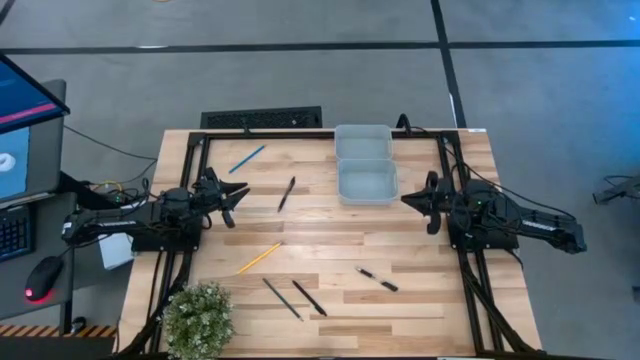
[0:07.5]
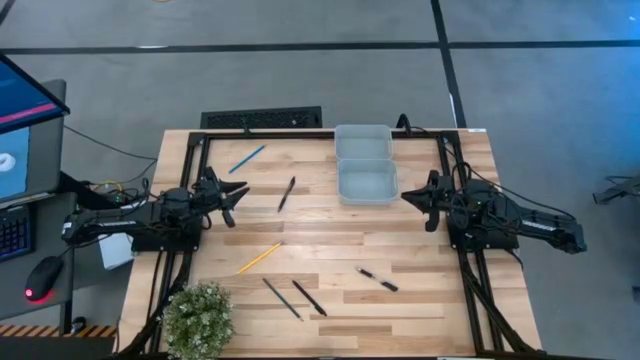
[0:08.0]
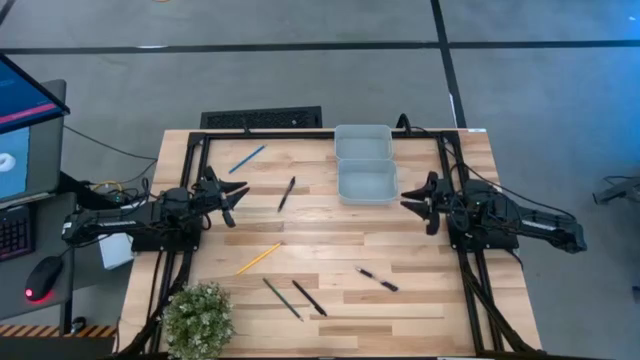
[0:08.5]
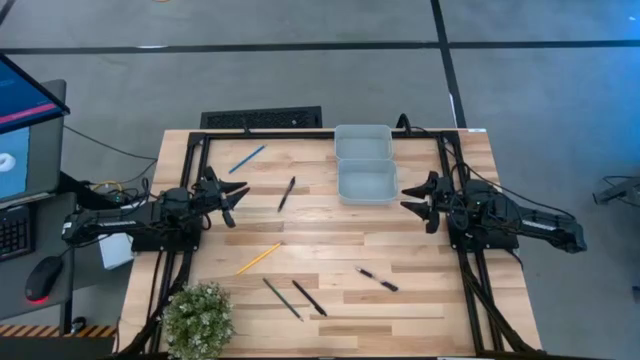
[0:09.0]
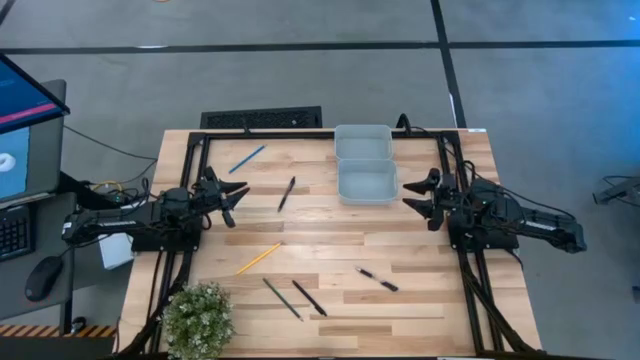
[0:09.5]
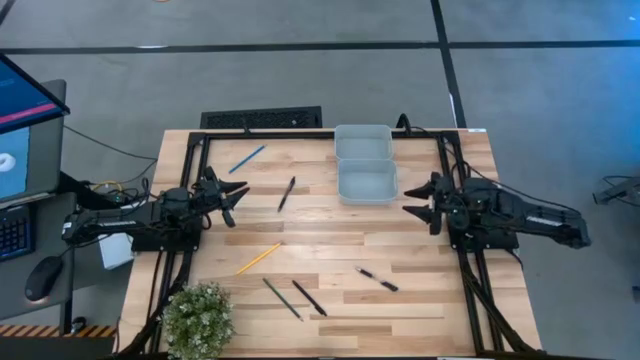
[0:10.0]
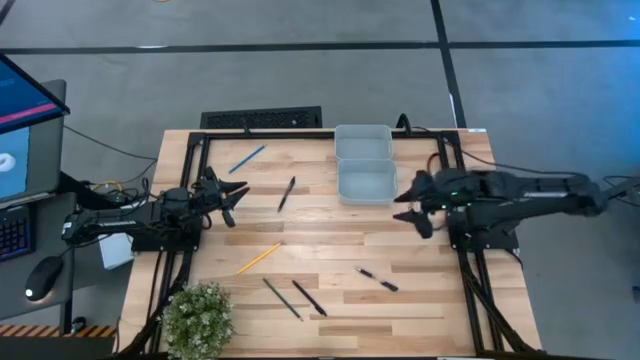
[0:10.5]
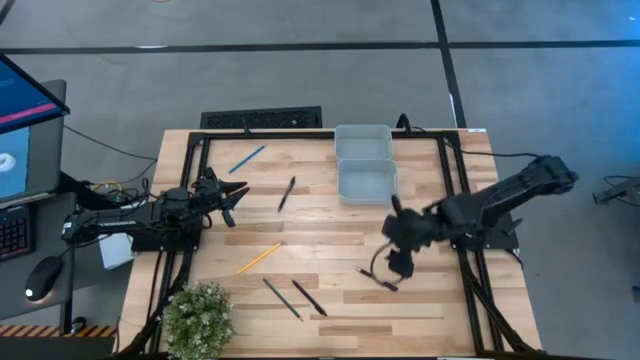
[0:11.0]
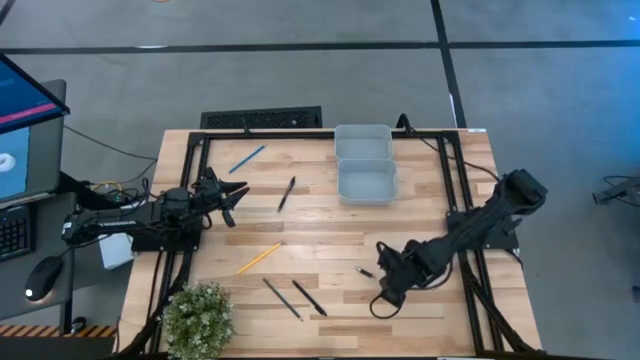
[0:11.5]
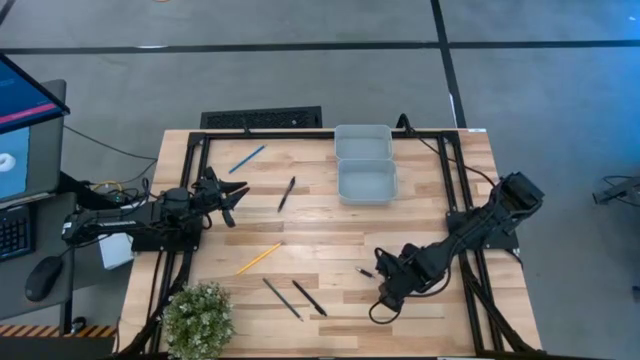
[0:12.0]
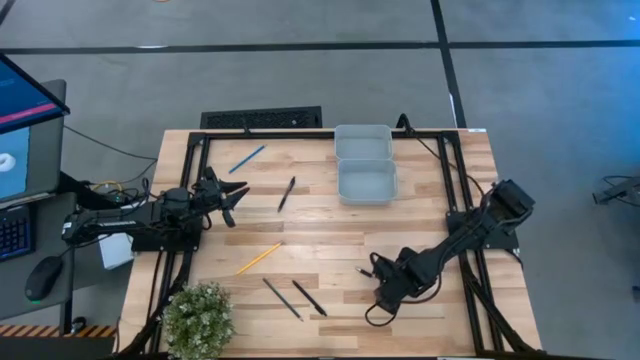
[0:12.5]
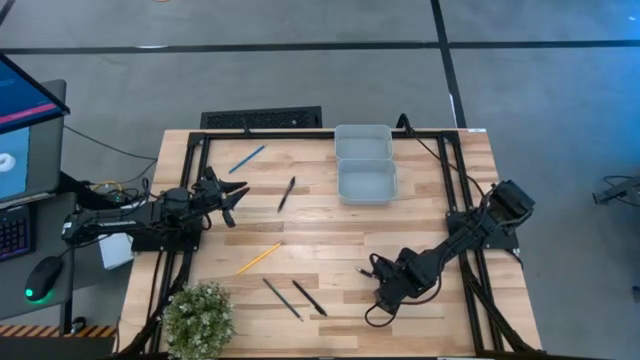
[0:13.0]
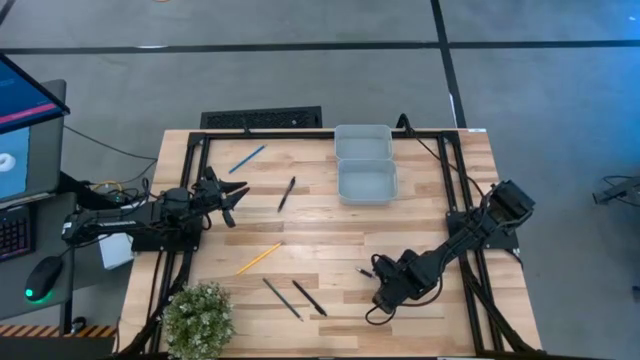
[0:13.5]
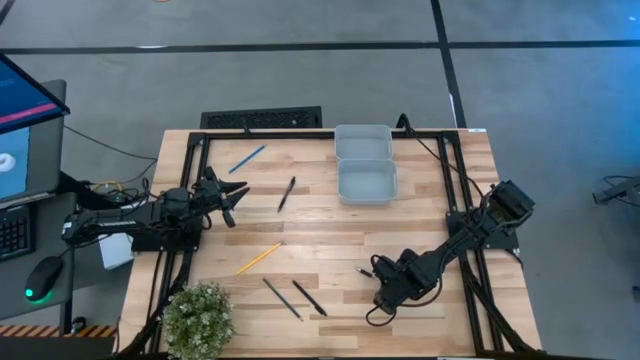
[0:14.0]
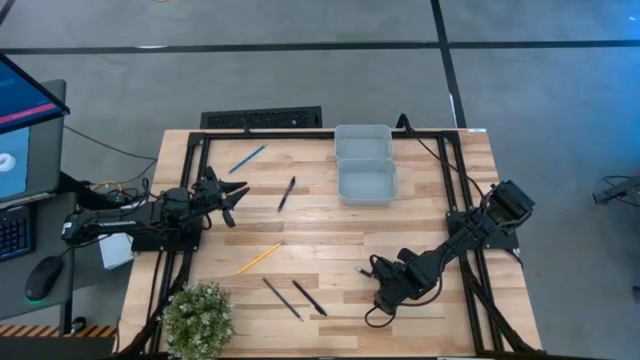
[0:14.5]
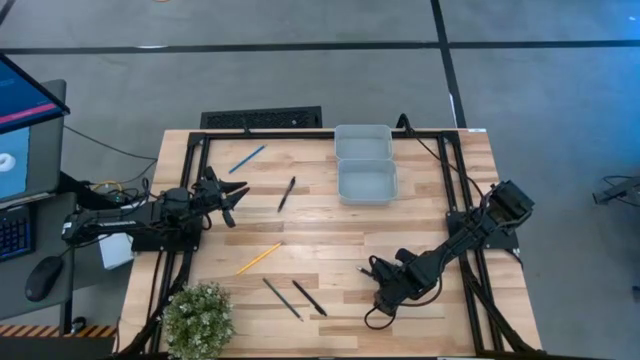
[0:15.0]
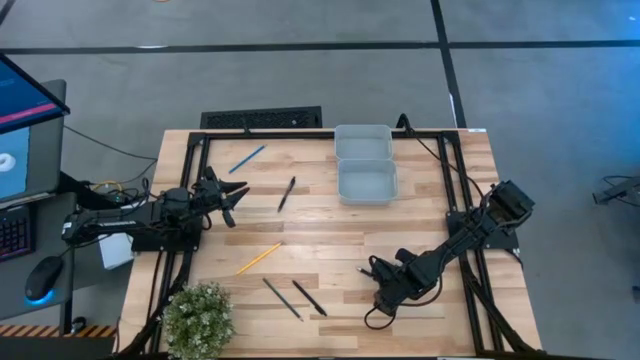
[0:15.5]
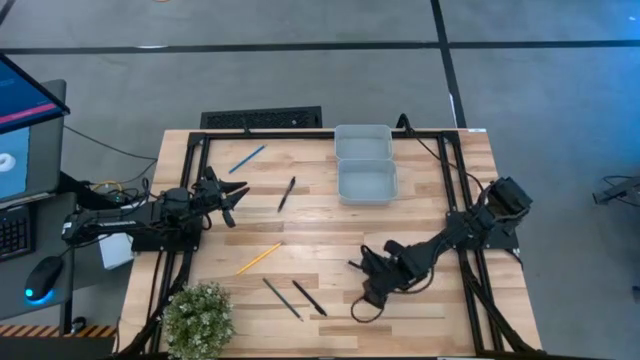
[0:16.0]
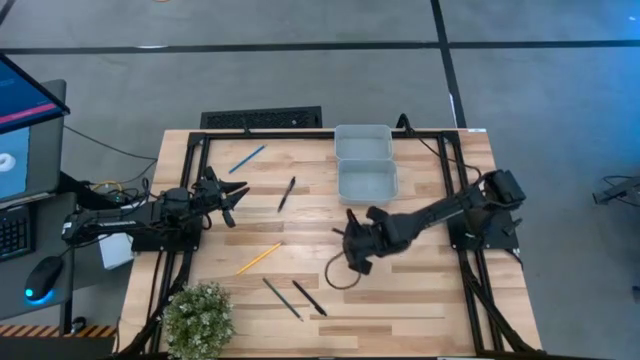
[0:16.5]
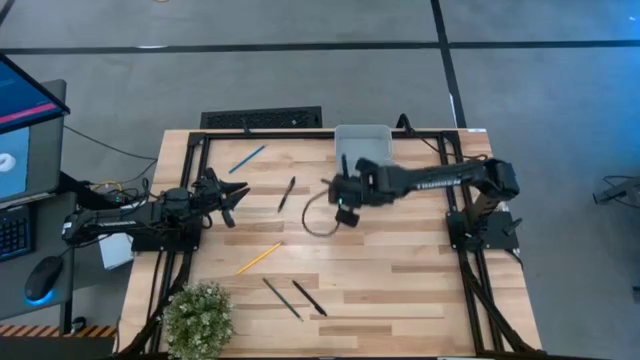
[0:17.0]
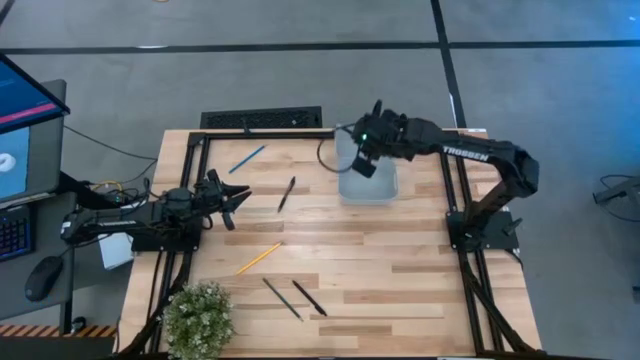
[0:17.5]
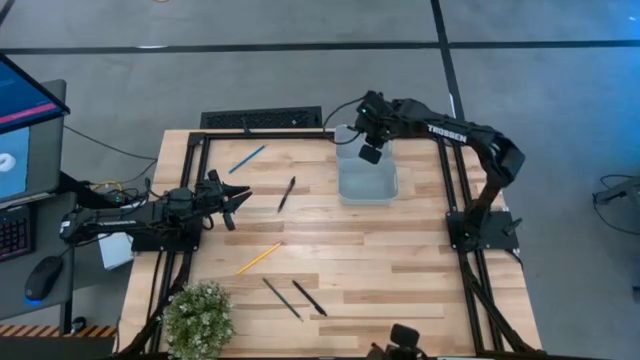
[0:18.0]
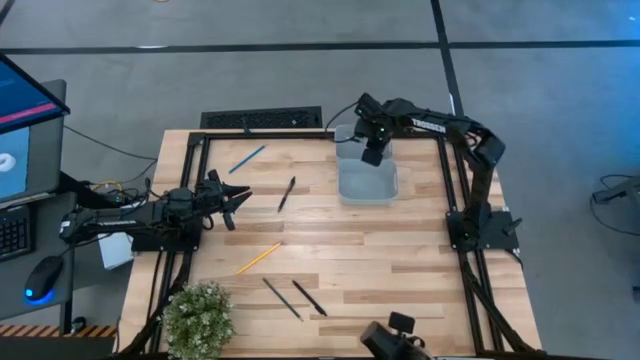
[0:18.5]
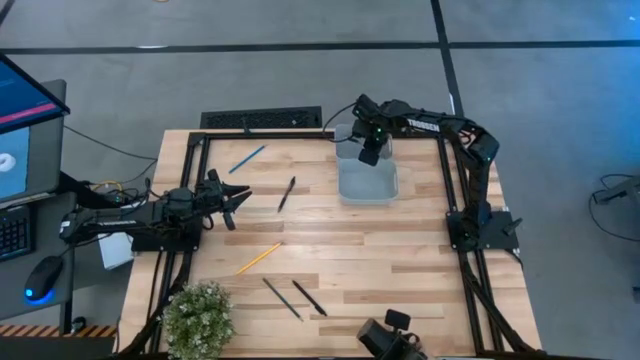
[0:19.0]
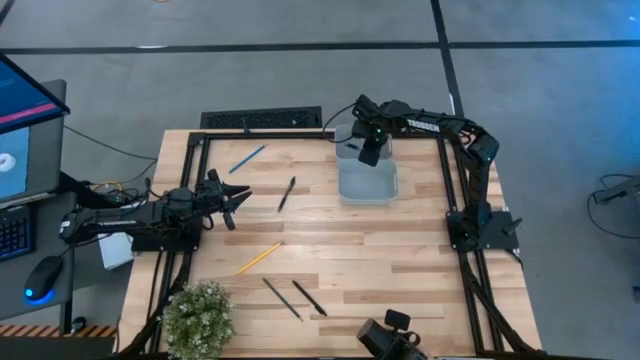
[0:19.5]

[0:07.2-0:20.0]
Task: Sort pens & pencils
Put the bottom right black pen into the top bin

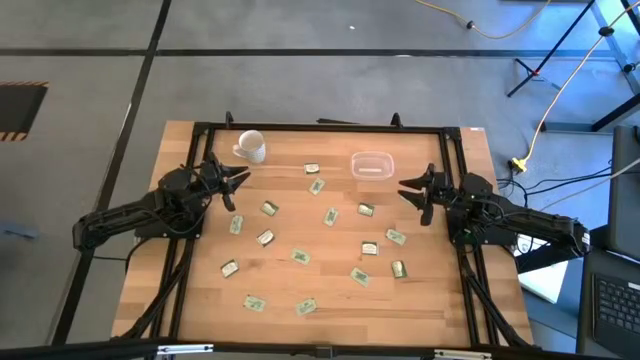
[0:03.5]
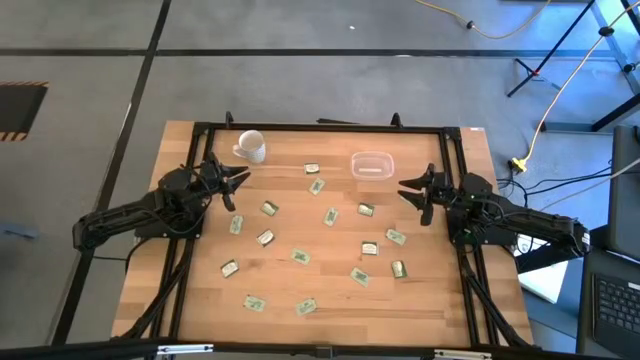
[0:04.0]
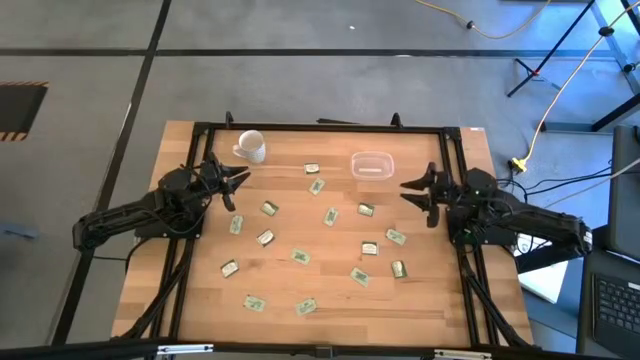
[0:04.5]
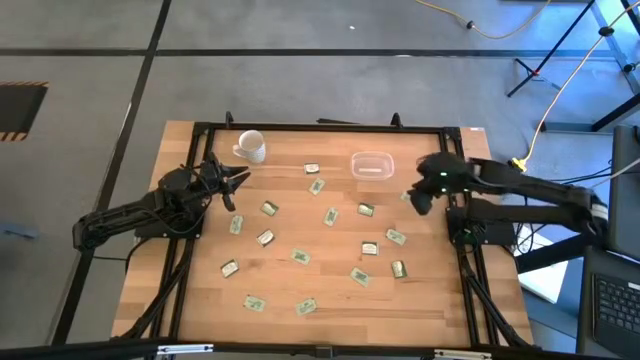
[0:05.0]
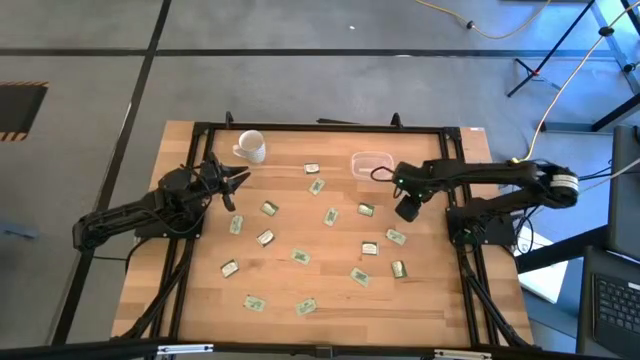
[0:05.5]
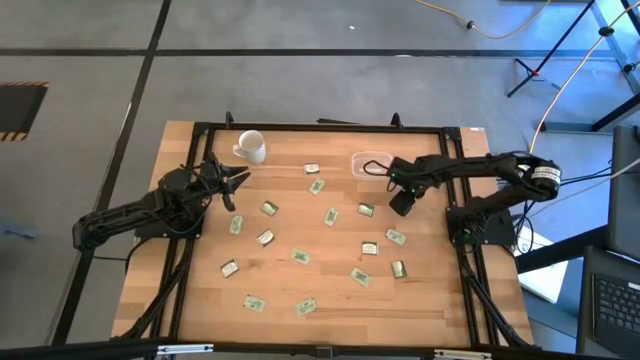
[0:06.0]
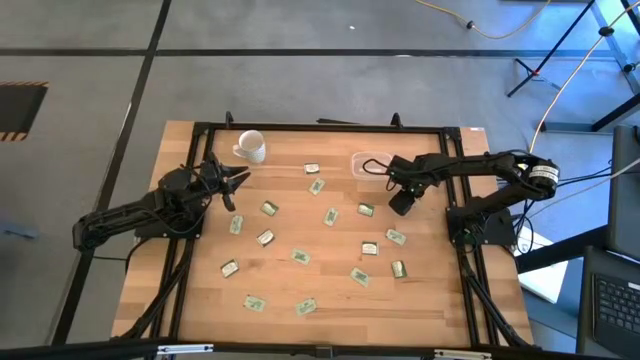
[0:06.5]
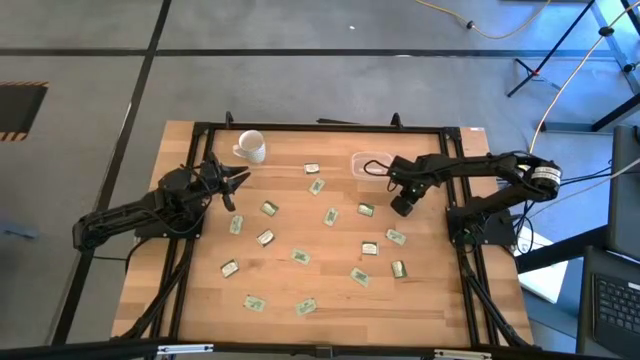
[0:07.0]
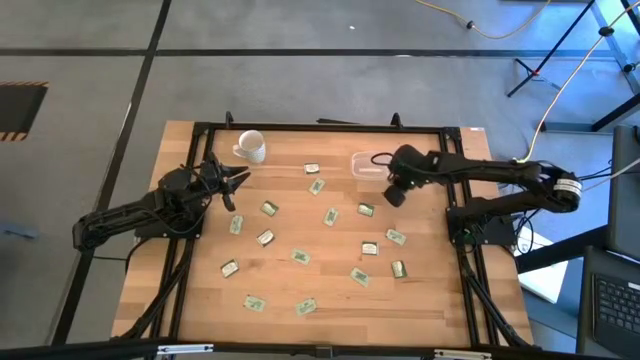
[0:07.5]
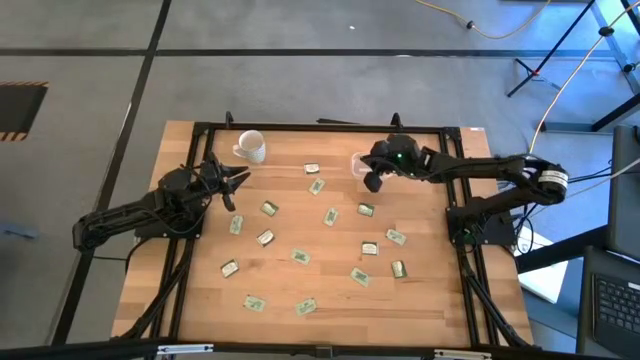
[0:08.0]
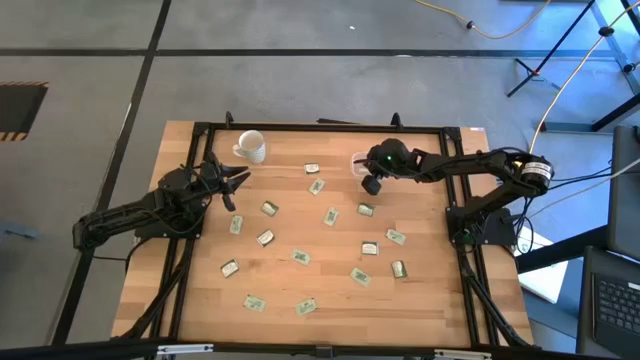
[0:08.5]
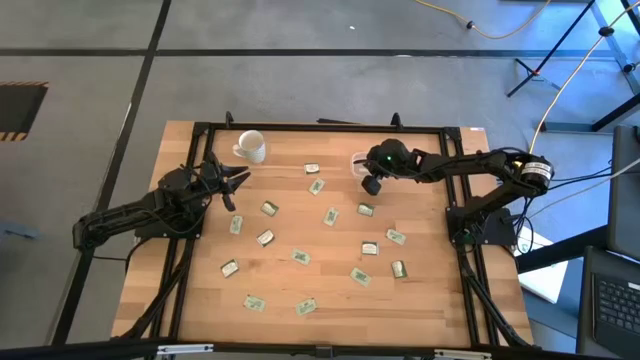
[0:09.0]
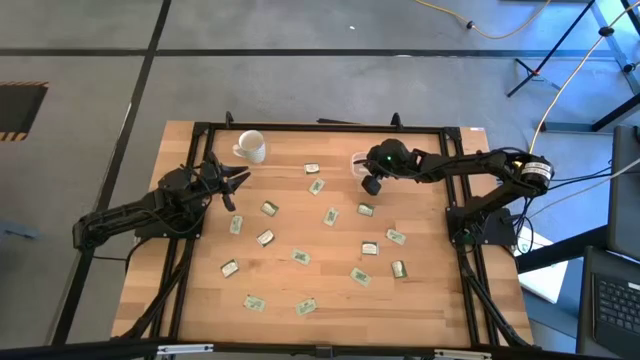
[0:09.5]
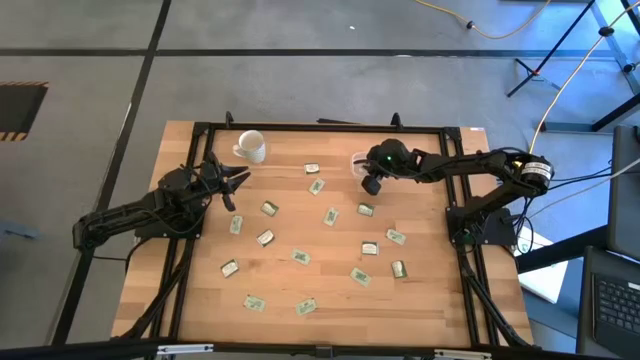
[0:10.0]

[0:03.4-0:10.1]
Task: Pick and place items into bin
Put the stevia packet into the transparent bin

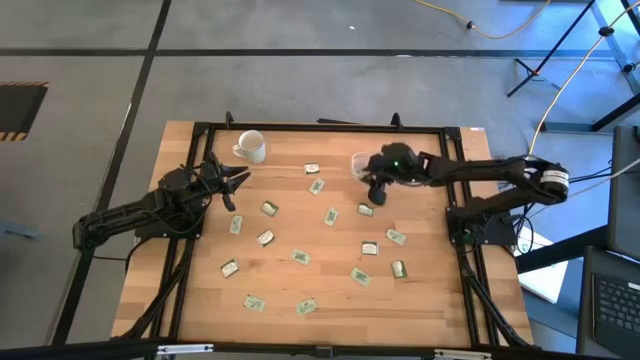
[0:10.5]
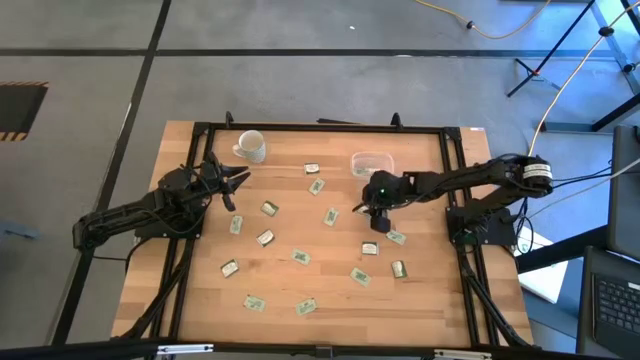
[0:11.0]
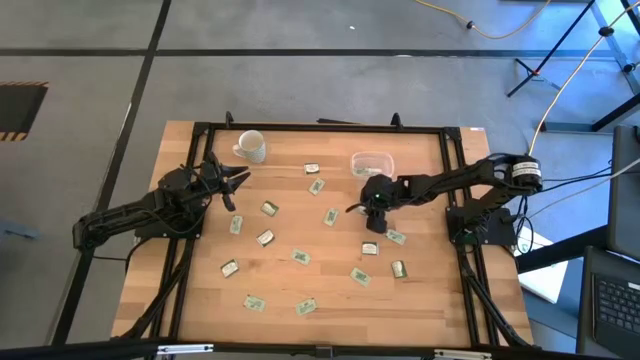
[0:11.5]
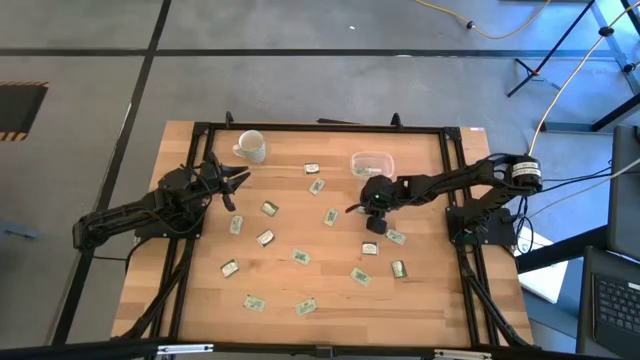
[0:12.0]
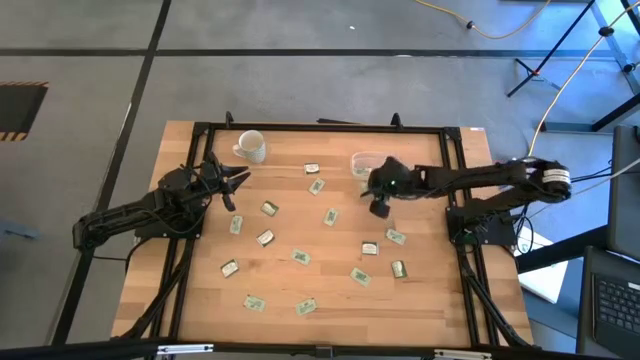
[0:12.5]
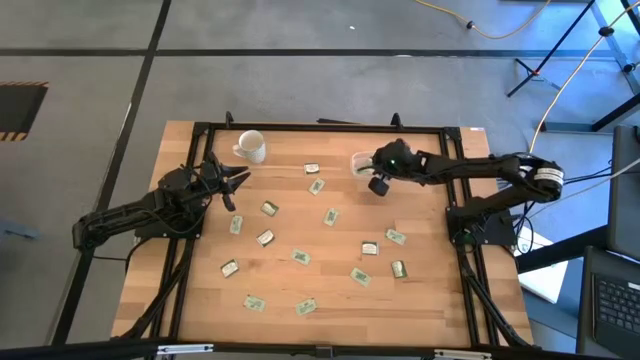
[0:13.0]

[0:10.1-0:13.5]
Put the truvia packet into the transparent bin
